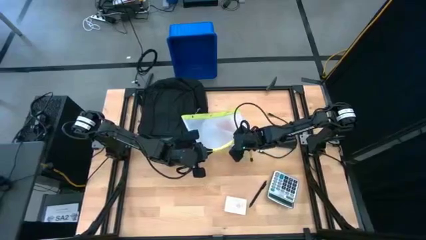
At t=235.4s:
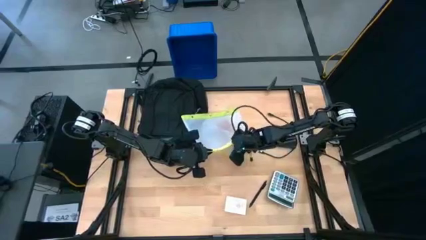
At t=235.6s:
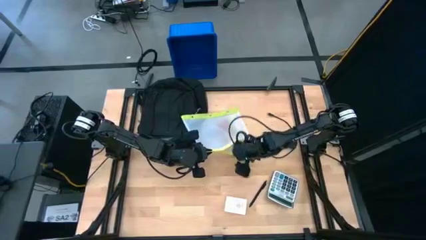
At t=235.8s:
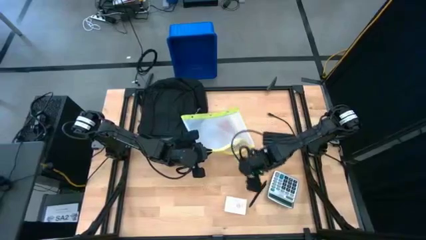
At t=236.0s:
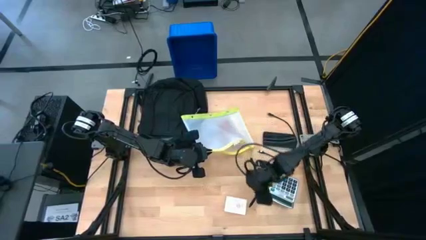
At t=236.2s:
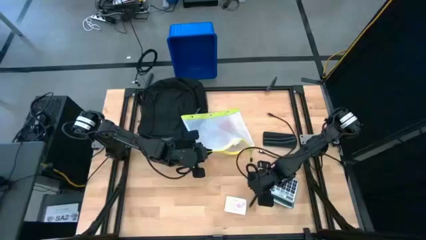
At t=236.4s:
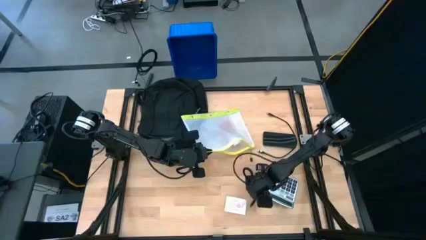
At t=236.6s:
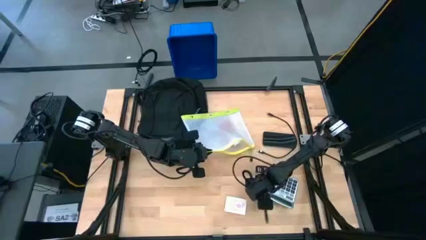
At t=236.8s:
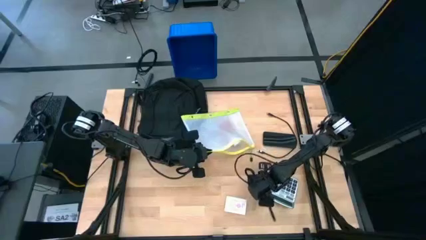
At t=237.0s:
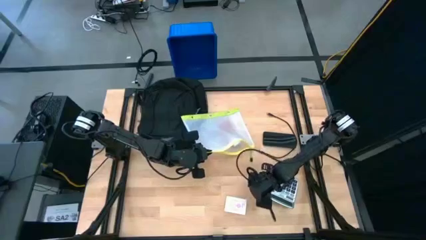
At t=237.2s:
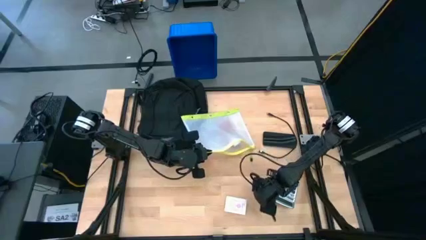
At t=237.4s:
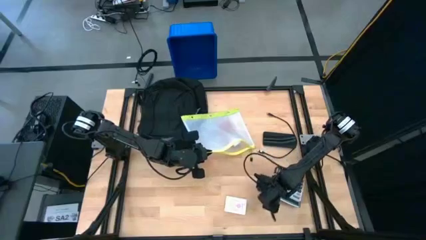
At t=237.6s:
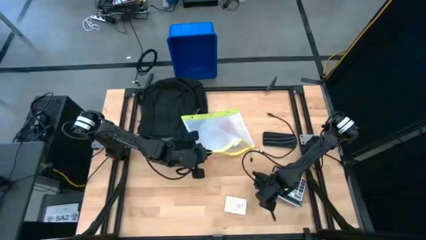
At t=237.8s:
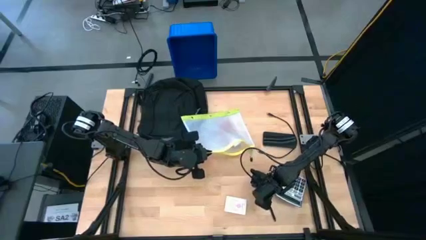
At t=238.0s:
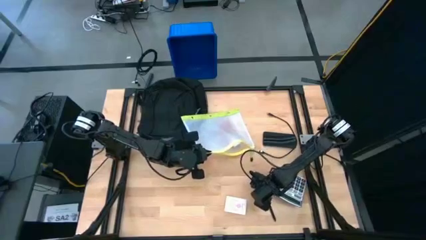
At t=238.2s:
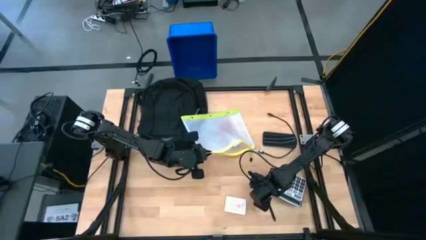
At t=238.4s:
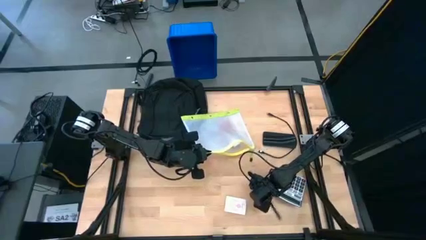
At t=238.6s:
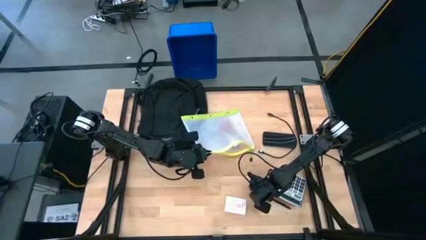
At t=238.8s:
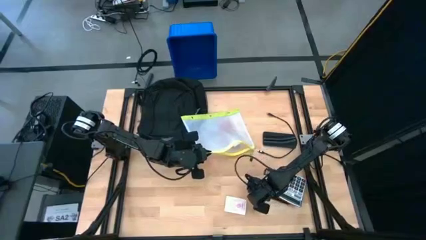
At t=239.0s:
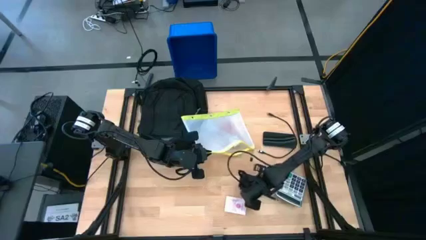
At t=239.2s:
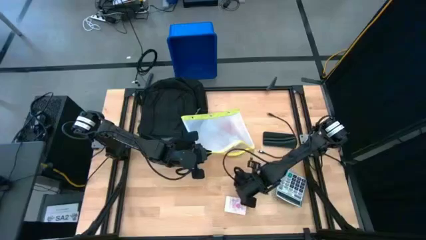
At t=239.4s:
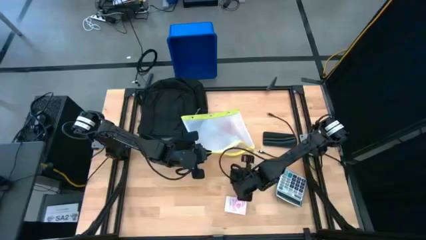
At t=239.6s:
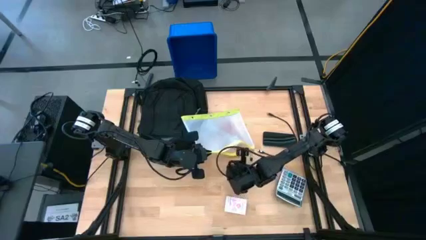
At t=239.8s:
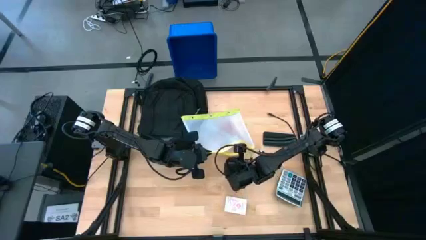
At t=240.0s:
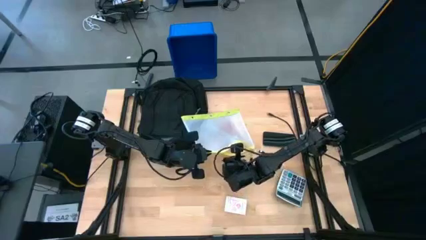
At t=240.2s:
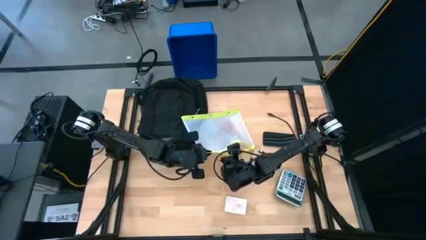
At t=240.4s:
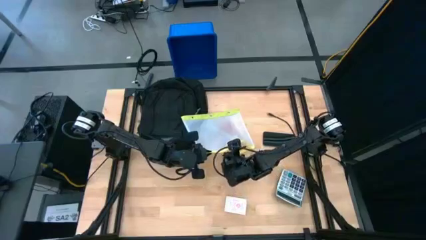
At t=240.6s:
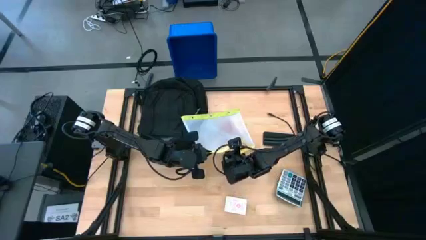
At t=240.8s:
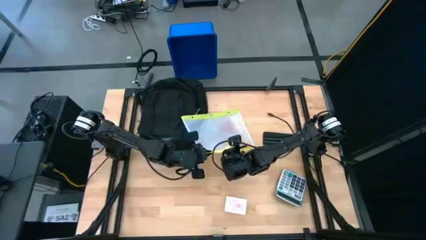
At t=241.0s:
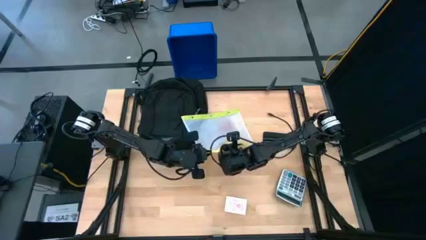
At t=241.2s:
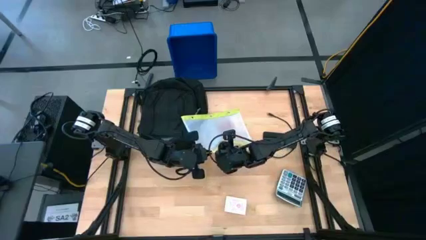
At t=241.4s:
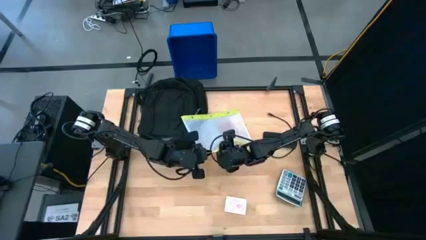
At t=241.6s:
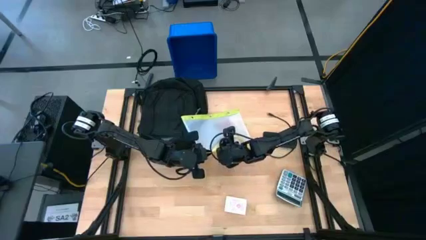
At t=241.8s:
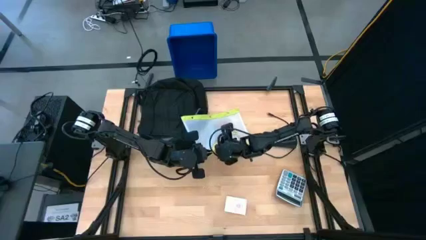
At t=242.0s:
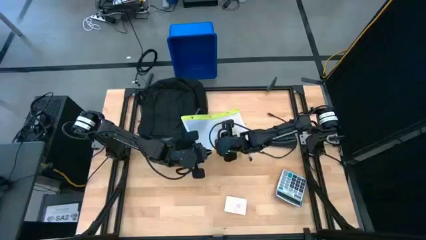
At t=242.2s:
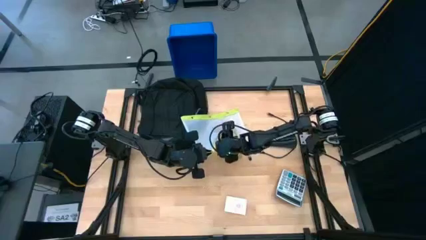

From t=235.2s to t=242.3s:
Task: Unpack backpack
Put the ballpen into the zip lock bag

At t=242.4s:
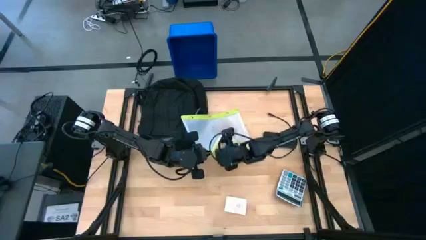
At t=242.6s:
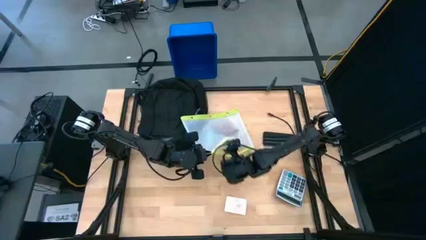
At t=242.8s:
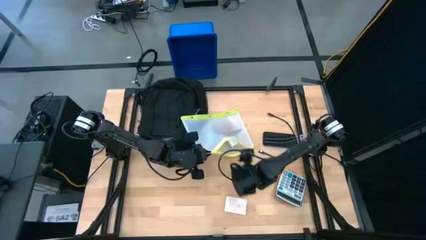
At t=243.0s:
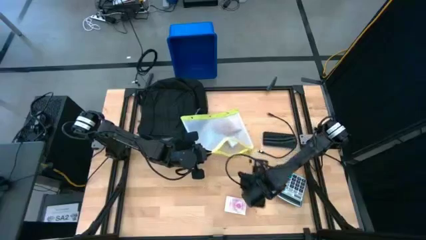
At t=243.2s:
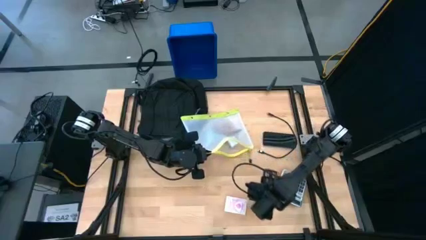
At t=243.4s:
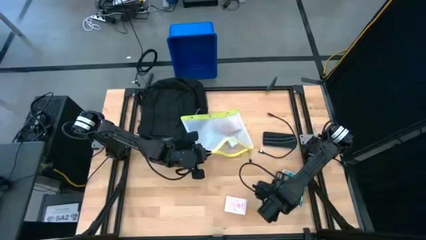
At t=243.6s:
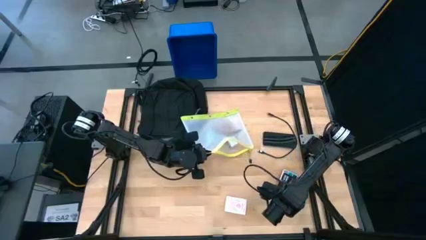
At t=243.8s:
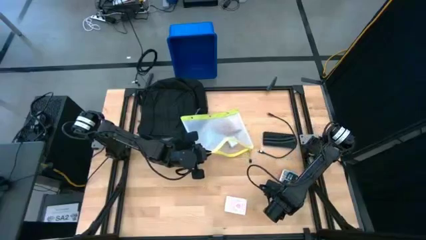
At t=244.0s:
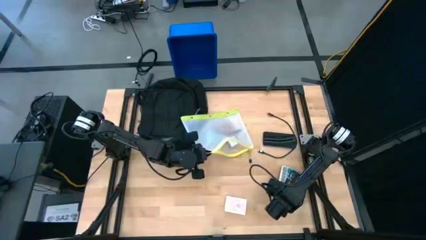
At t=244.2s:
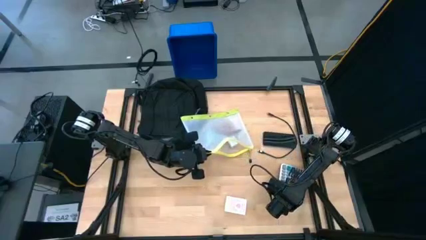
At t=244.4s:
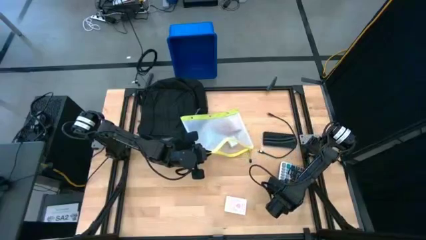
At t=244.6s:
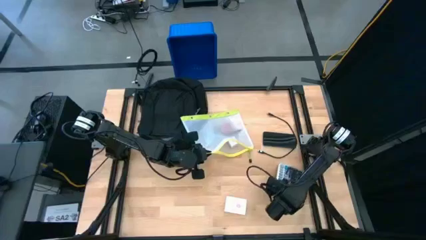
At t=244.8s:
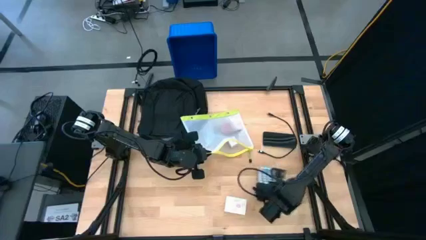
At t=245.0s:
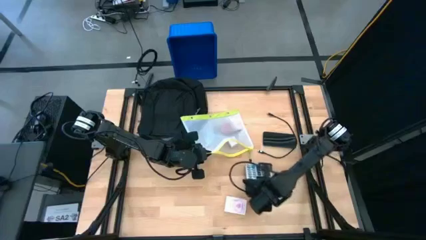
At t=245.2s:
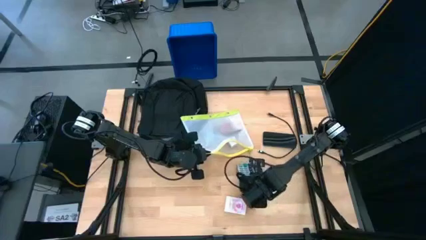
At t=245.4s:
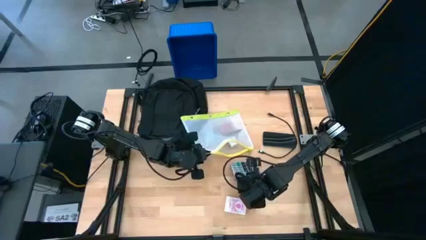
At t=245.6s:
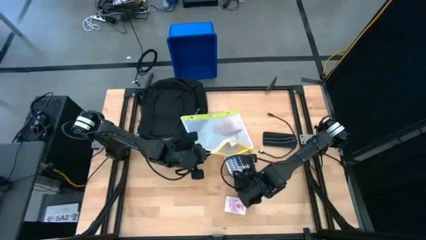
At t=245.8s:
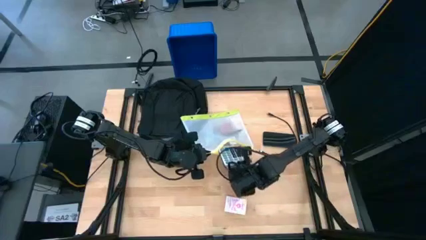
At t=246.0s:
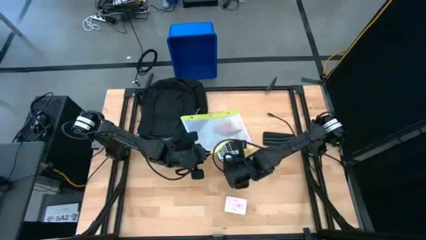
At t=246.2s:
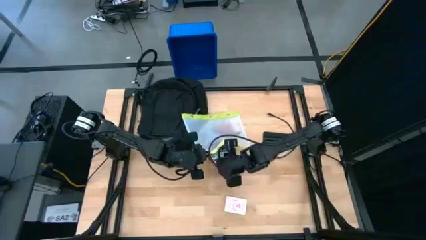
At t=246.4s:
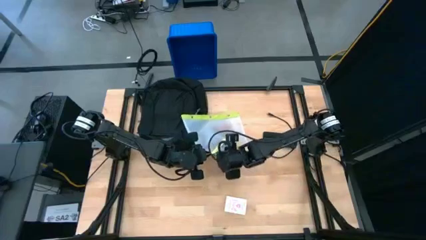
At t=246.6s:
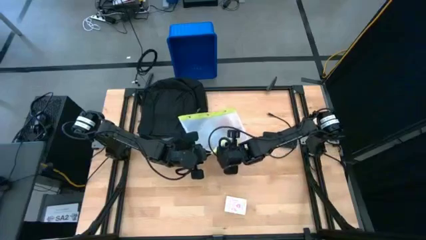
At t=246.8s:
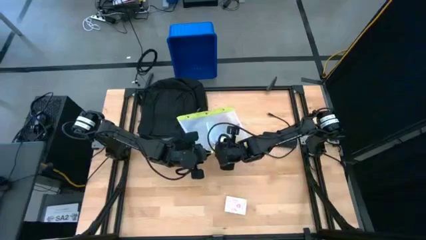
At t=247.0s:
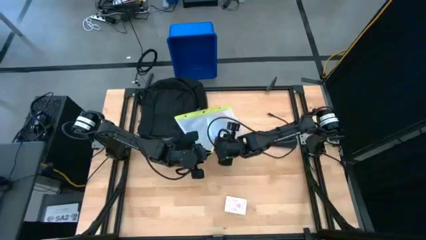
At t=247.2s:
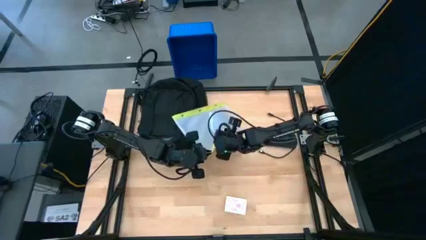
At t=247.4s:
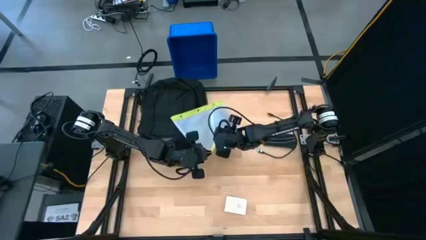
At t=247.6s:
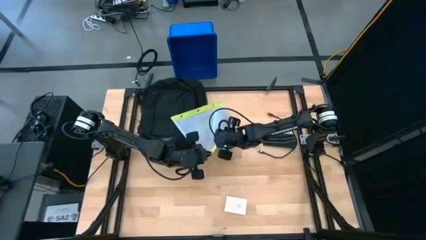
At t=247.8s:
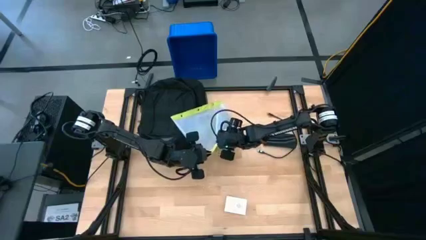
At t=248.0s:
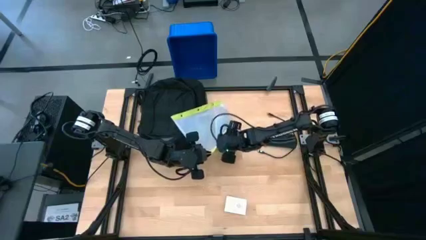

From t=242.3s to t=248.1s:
Put the calculator into the zip lock bag

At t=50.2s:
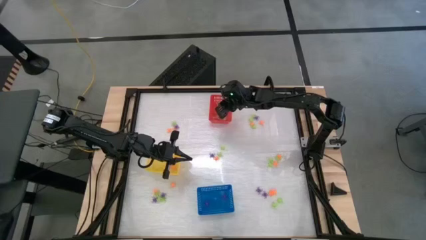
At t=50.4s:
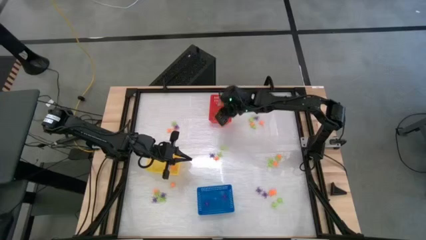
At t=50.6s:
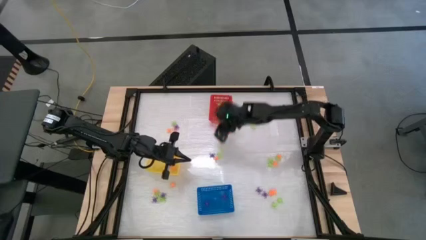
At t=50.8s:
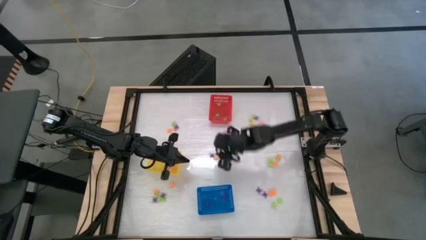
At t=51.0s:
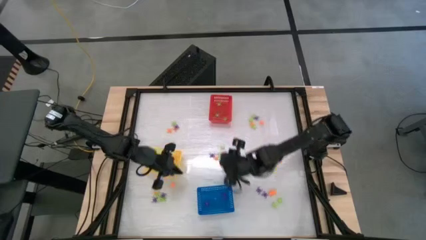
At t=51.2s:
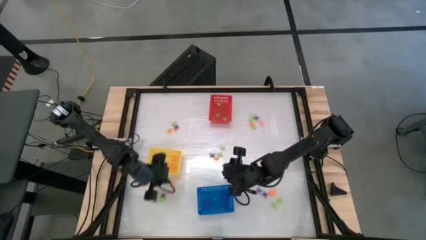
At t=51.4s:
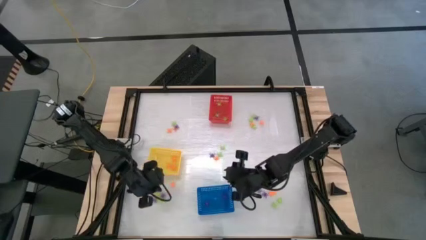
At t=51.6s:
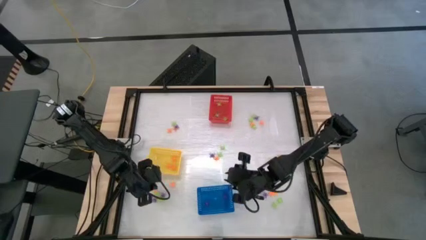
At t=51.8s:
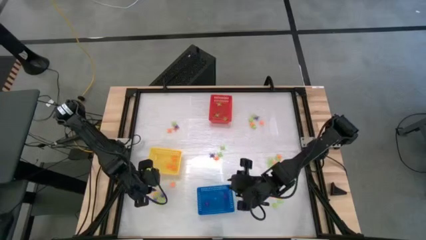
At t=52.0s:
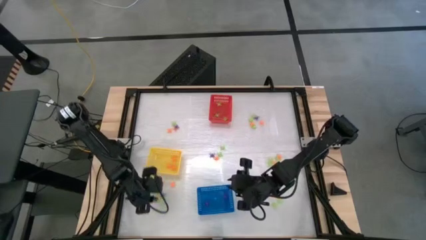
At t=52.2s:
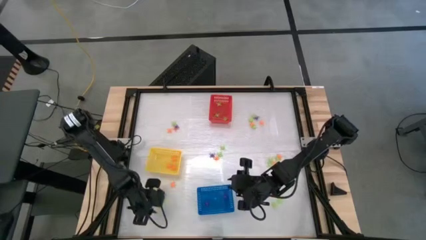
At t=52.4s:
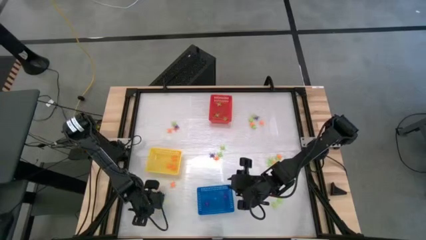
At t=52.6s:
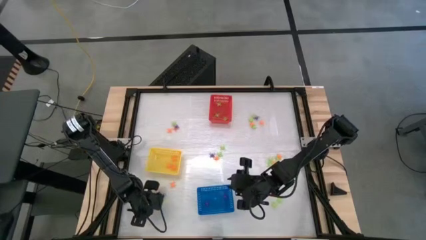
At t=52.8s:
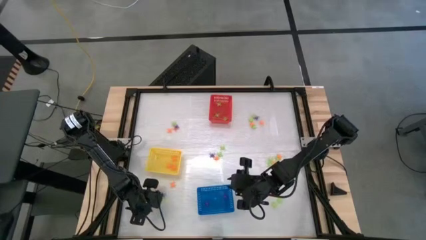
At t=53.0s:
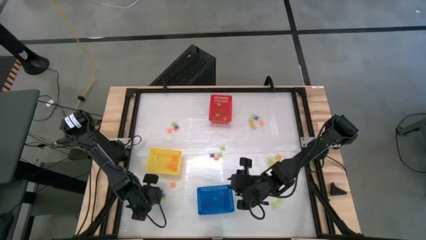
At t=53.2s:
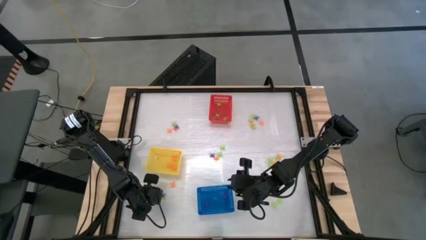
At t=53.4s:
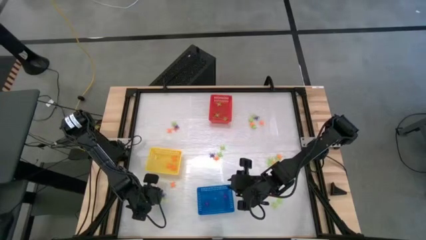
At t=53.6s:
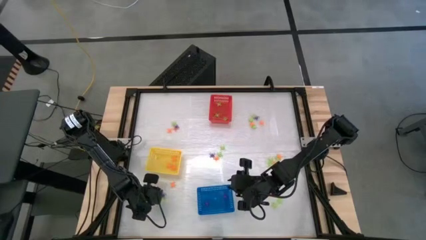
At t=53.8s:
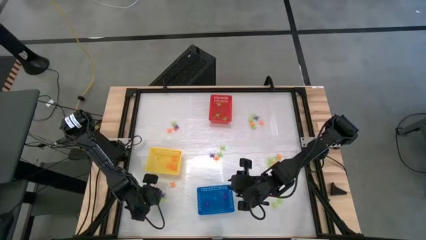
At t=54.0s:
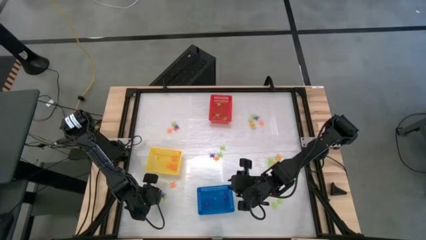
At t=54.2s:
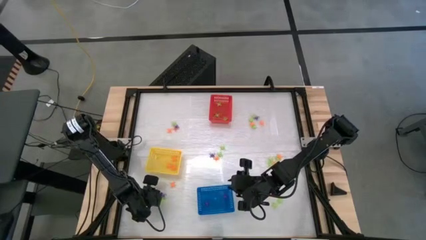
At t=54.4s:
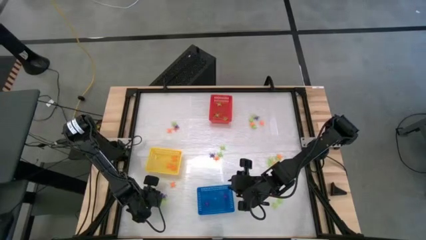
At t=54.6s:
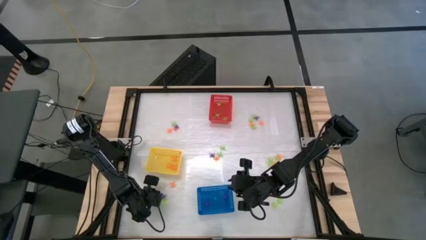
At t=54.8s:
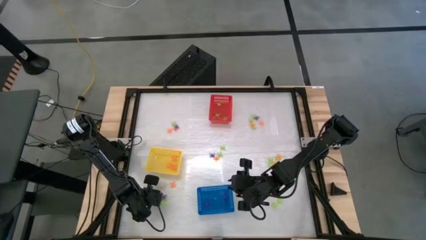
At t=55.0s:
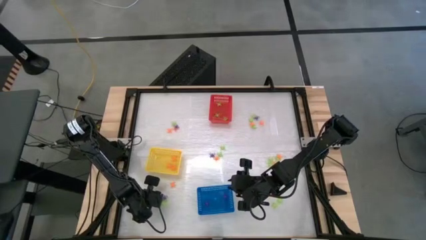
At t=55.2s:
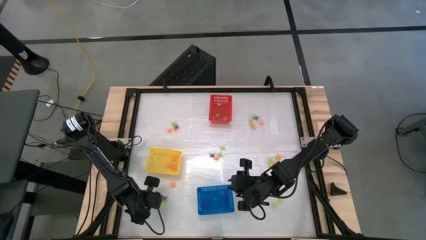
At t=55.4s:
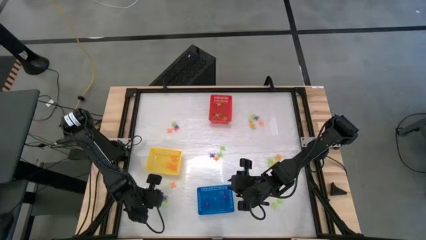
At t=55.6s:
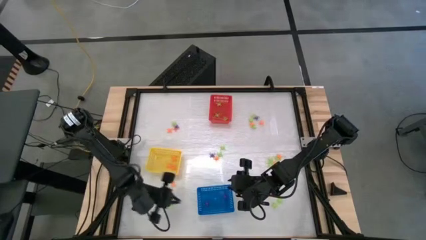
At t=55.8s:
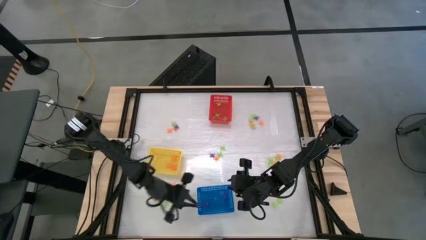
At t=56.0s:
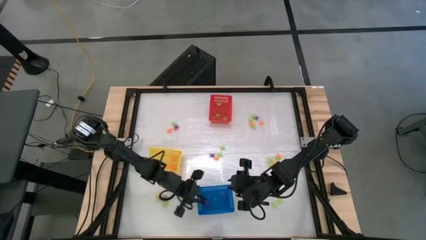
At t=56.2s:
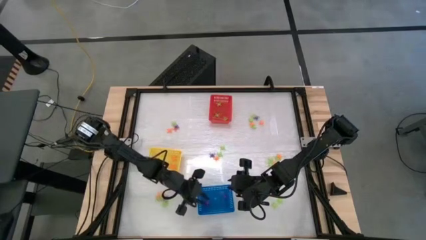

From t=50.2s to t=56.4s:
Task: Sort Halloween decoration
Put the purple spider toy into the blue basket
